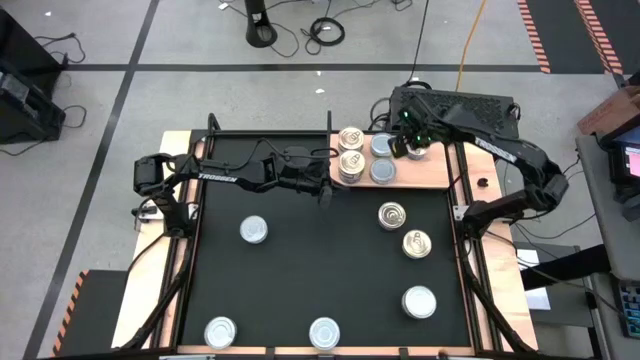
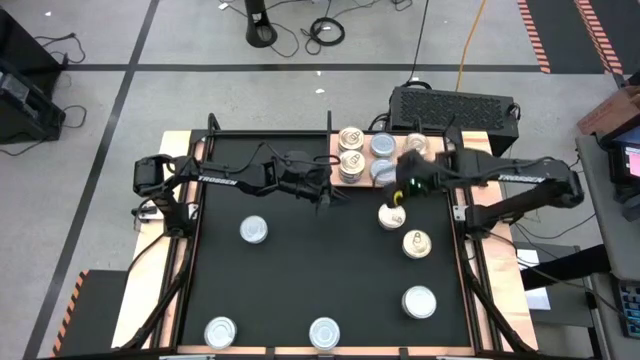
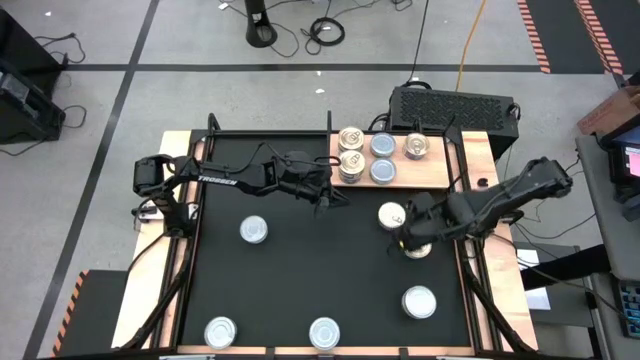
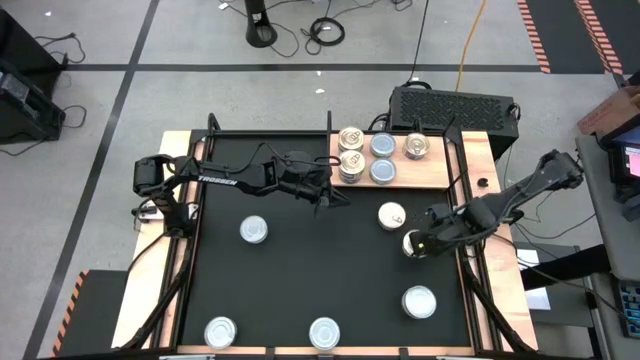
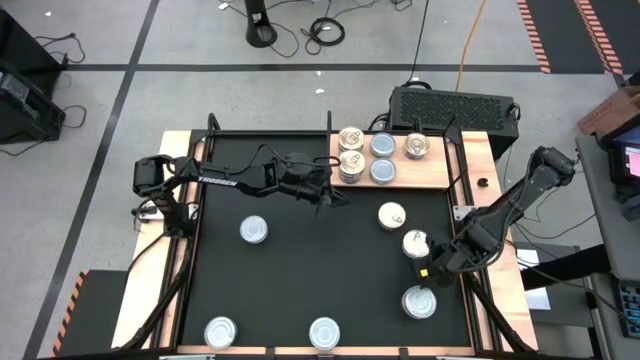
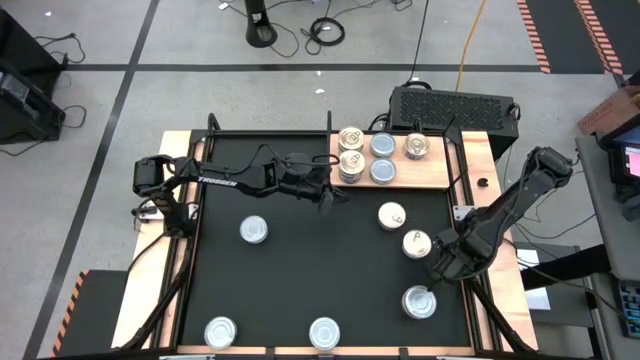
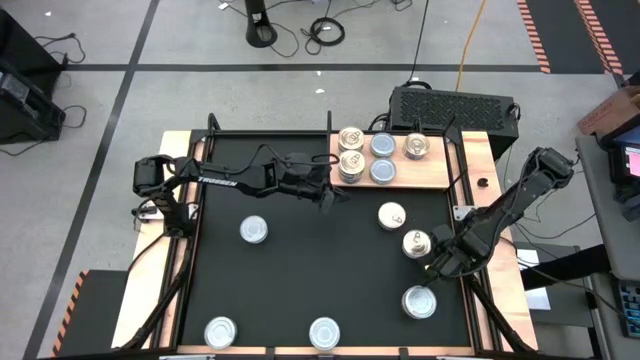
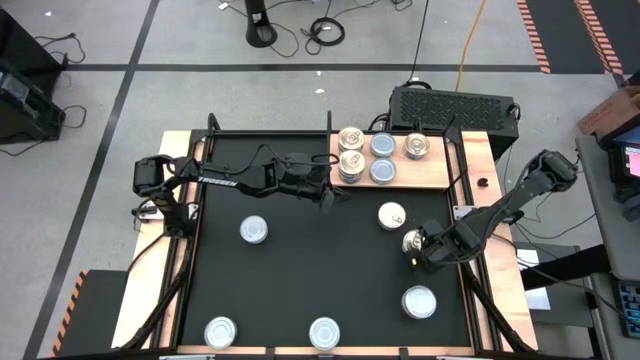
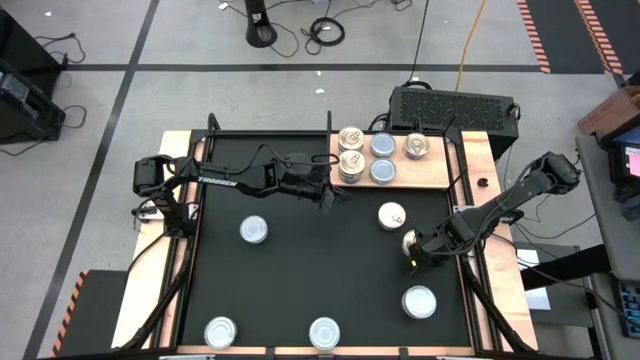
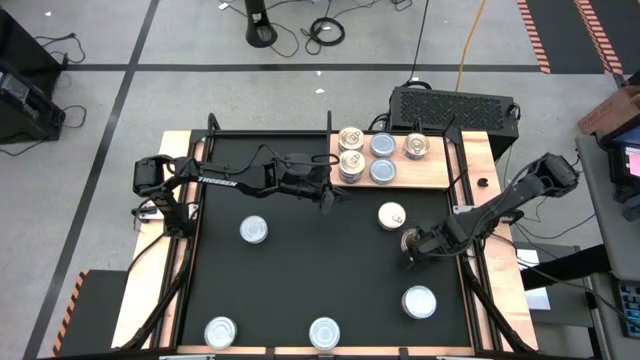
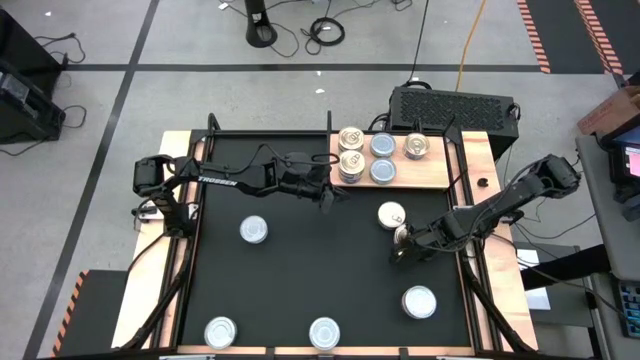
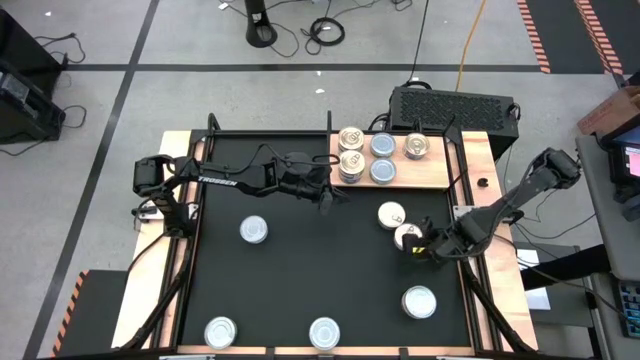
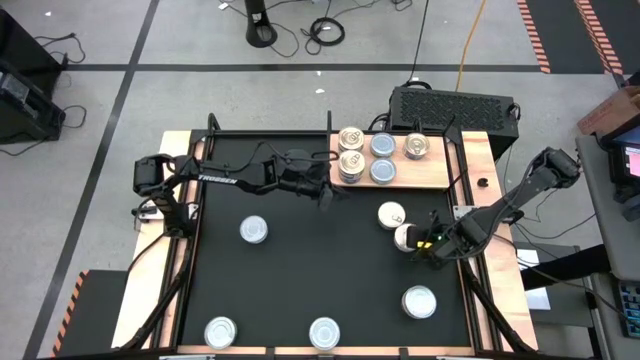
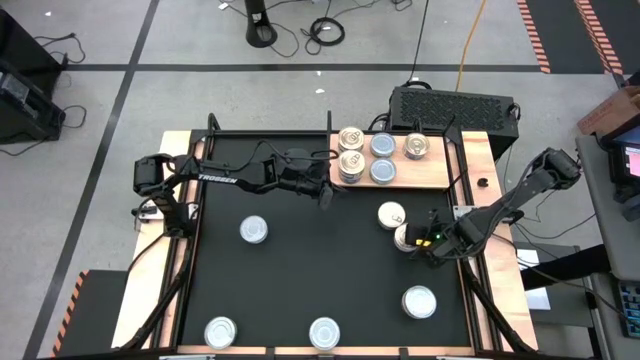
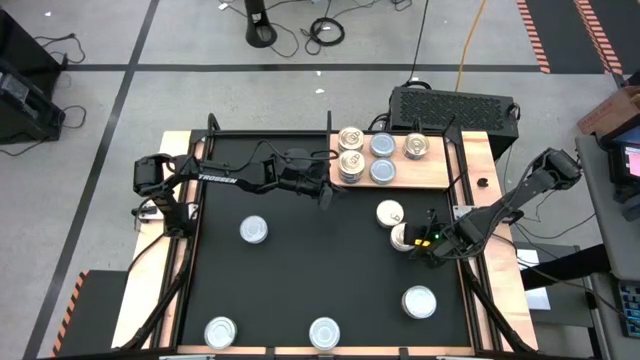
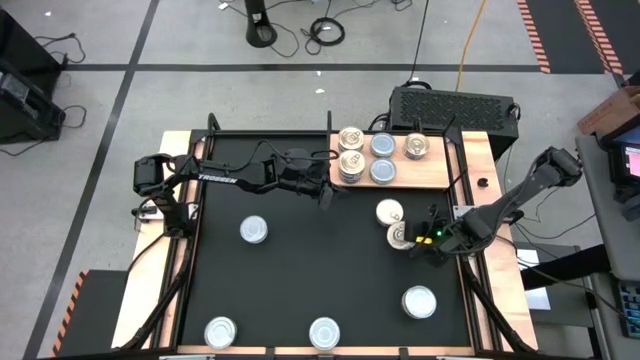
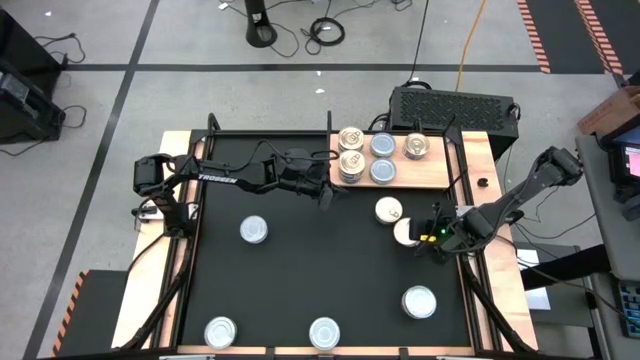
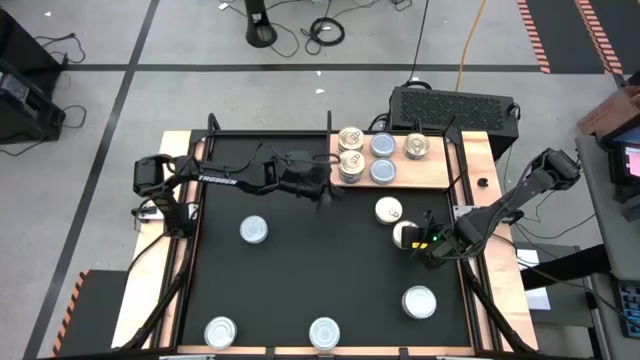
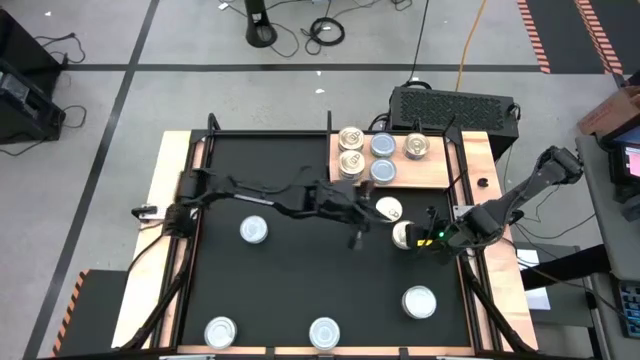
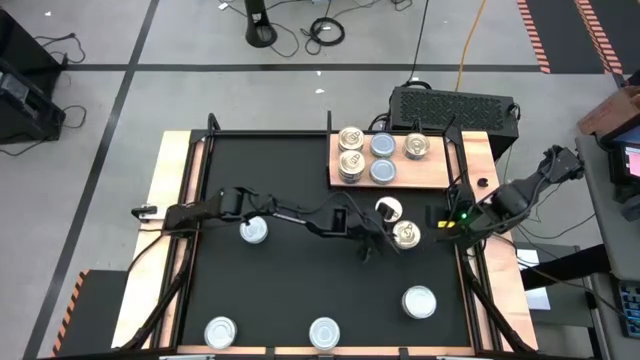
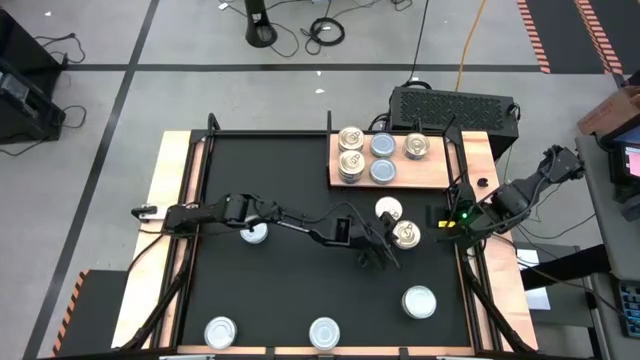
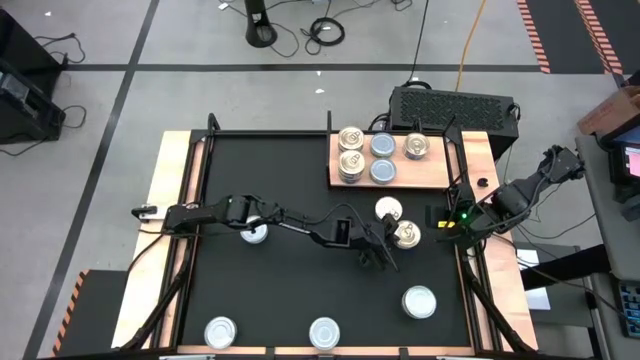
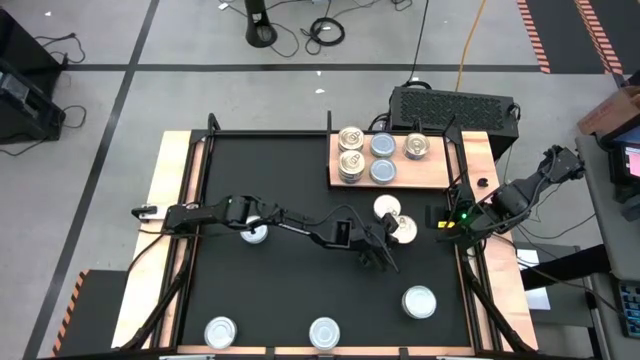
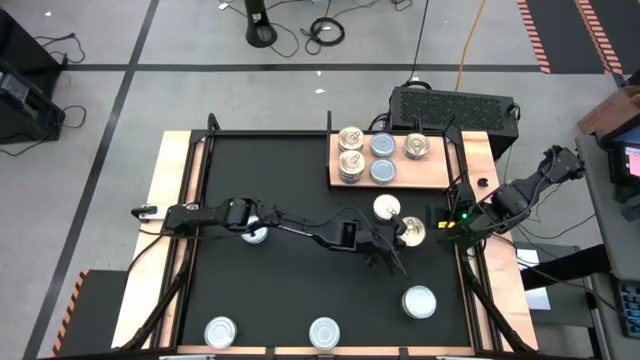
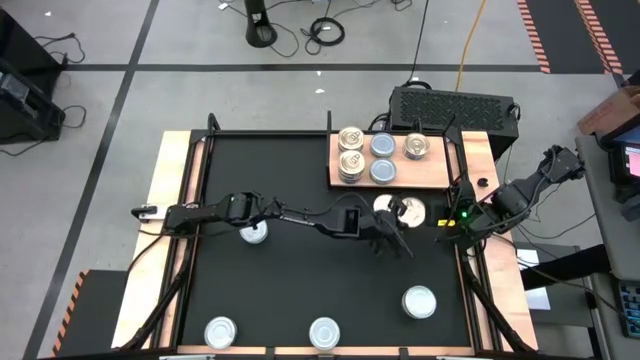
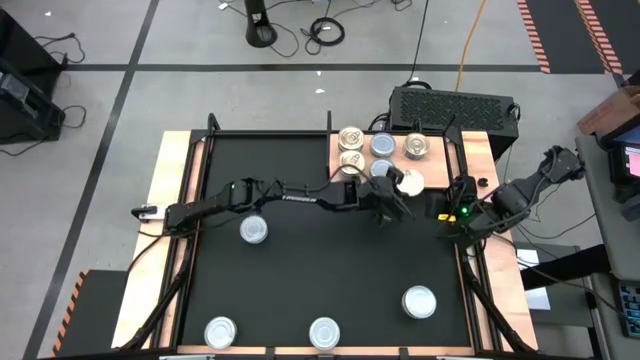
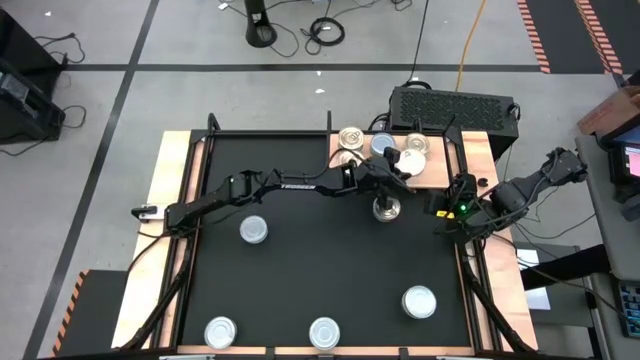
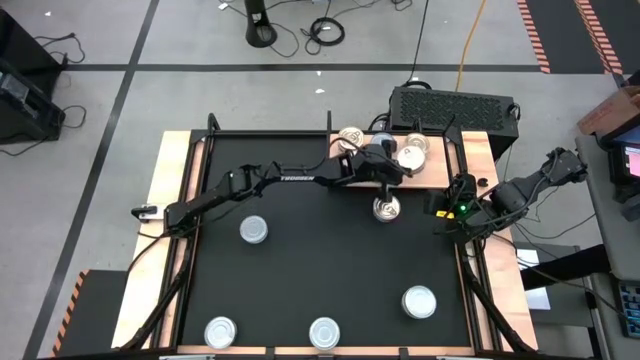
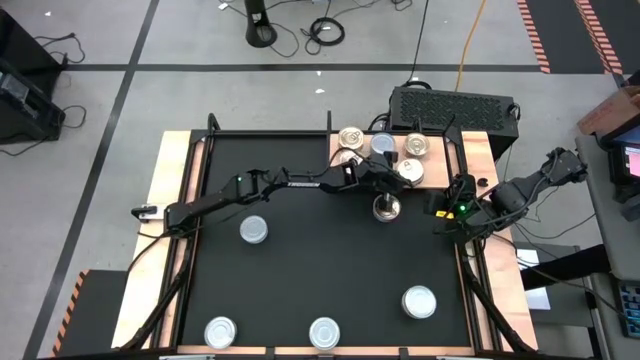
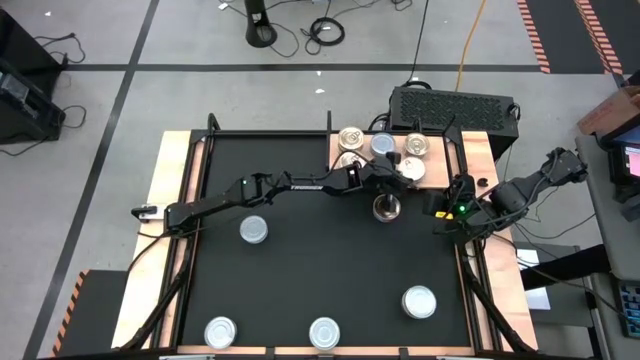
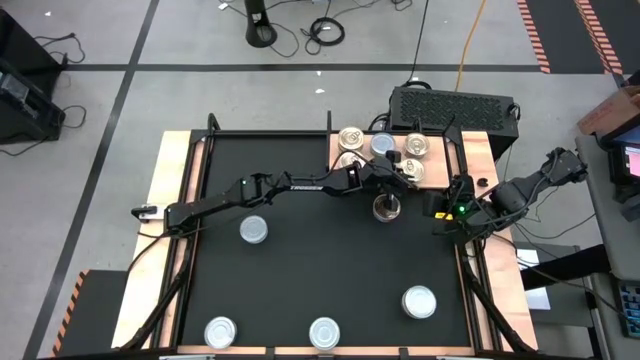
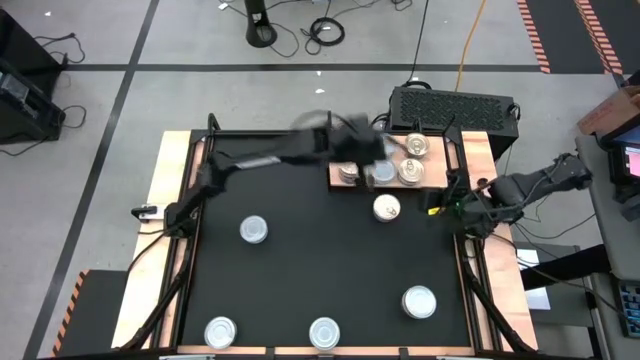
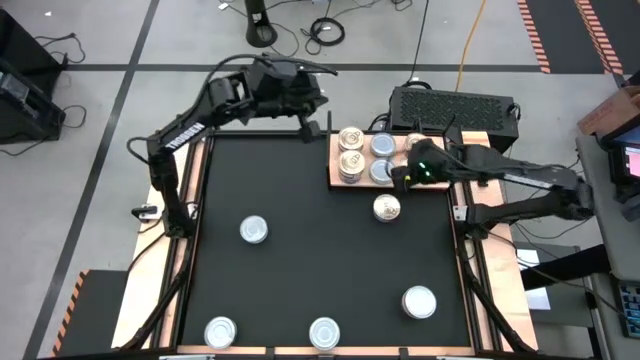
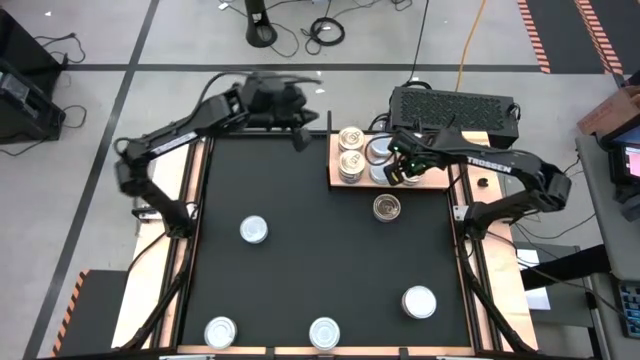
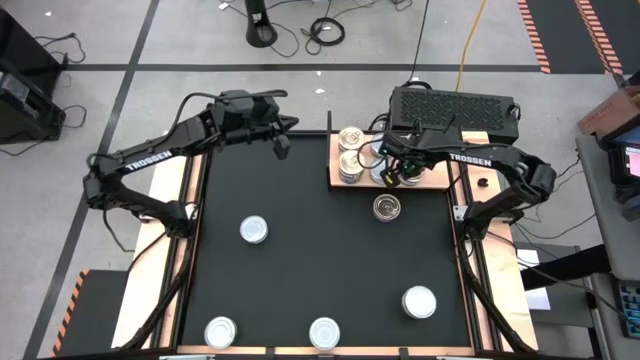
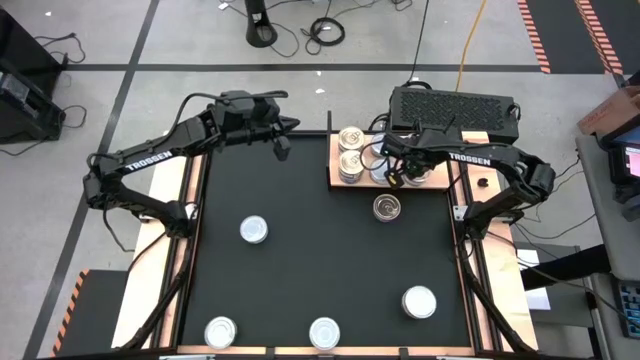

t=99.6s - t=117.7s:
Task: Stack canned seafood by type on shelf
Put the blue pink tuna can on the shelf aligned with the other blue pink tuna can

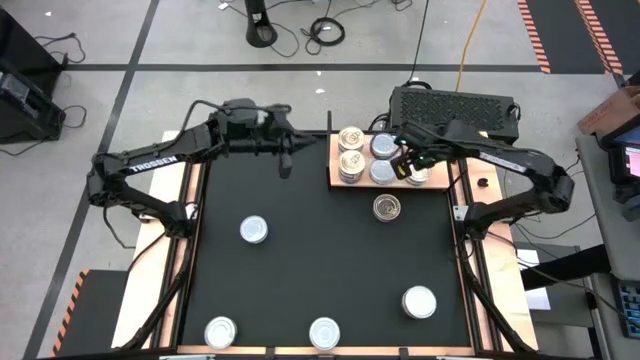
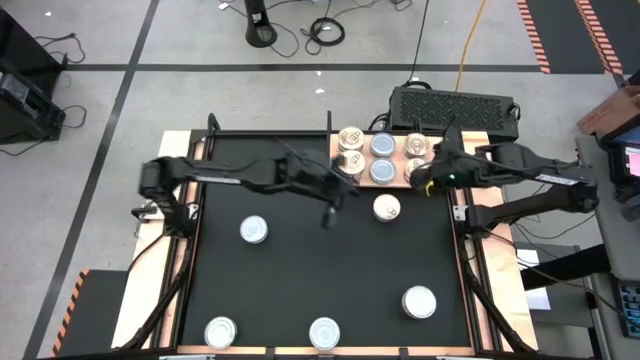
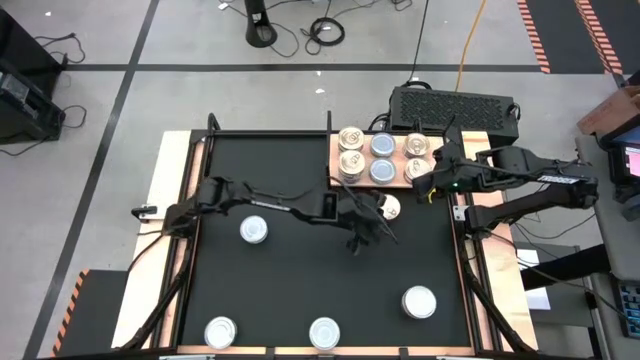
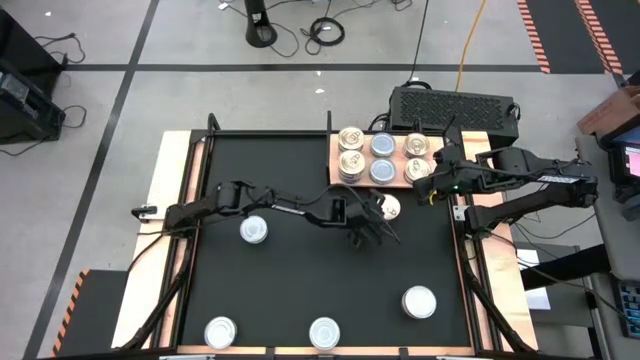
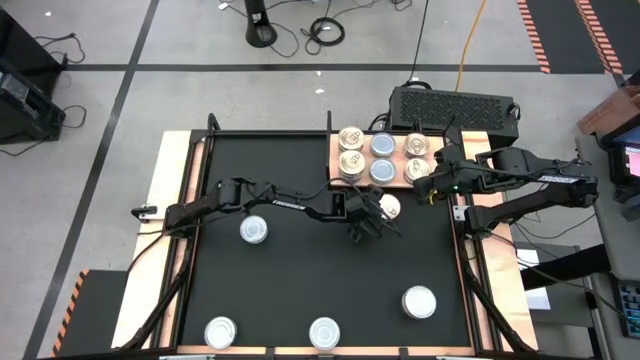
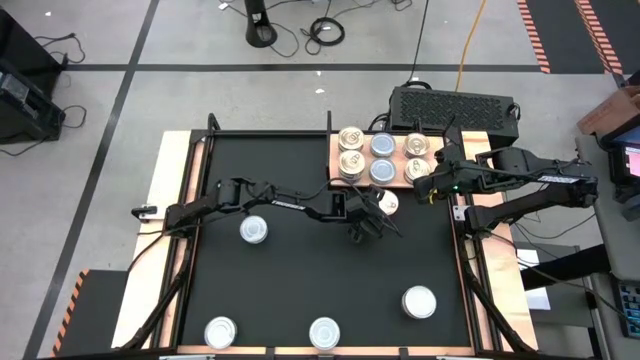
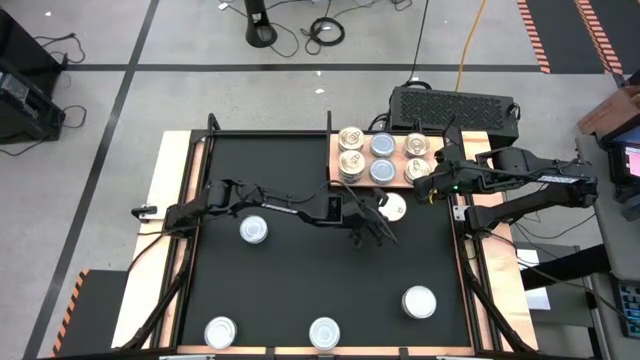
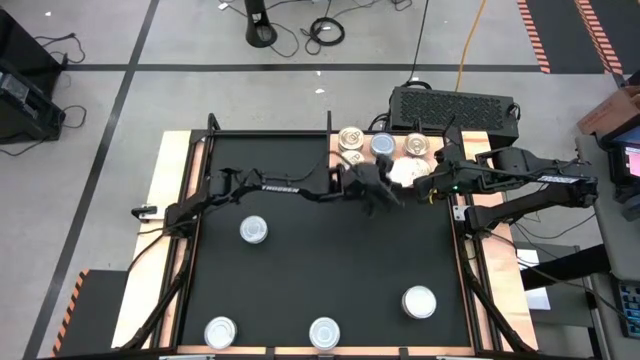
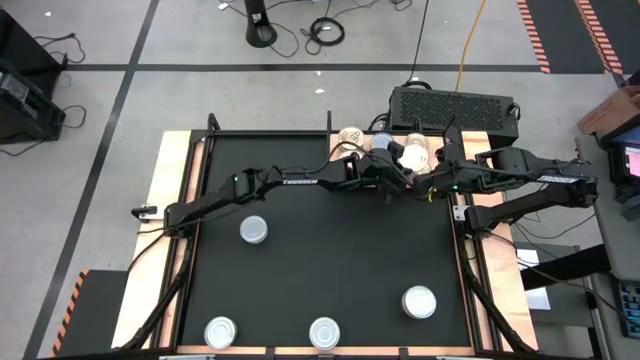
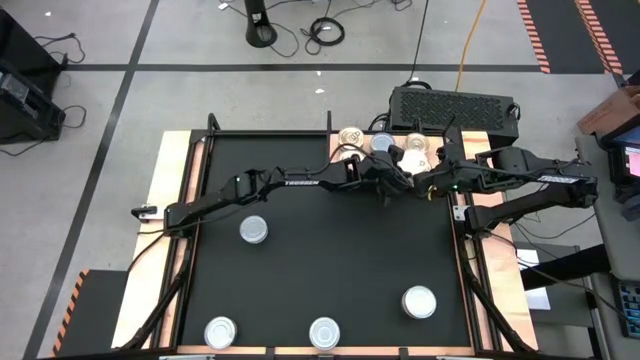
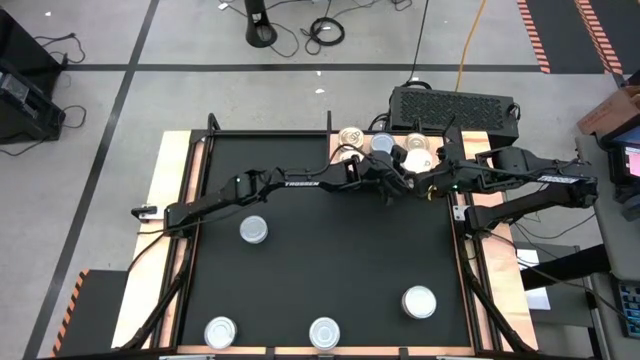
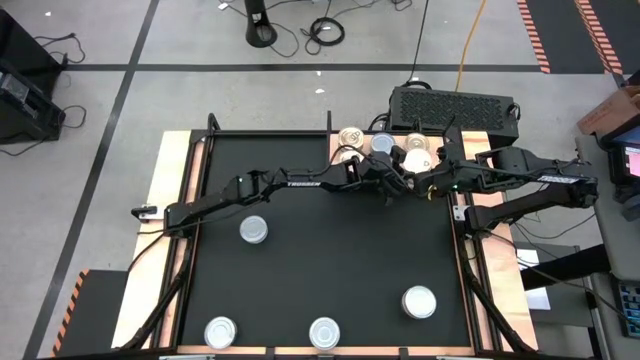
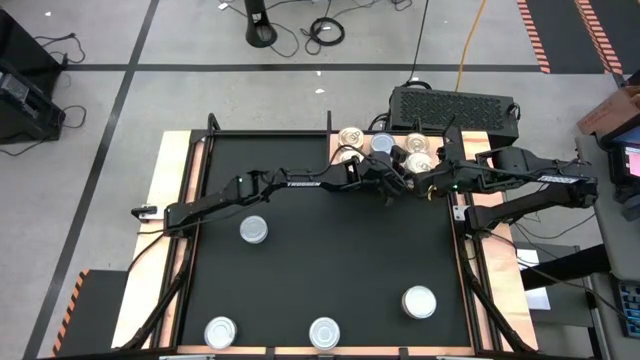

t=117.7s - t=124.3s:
Stack the blue pink tuna can on top of the other blue pink tuna can on the shelf
